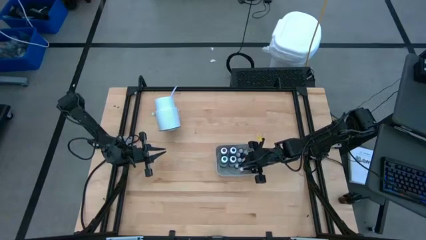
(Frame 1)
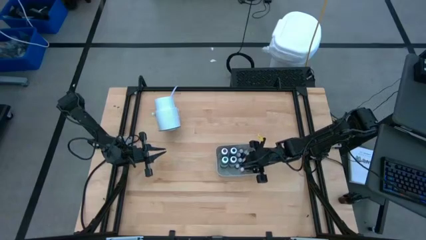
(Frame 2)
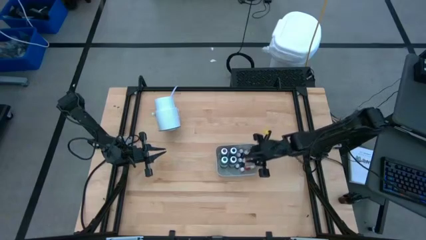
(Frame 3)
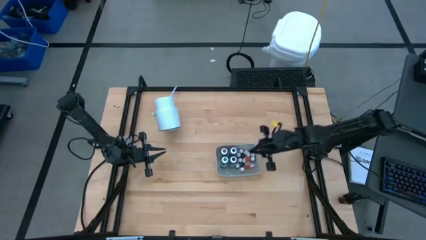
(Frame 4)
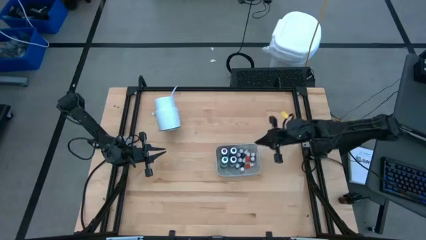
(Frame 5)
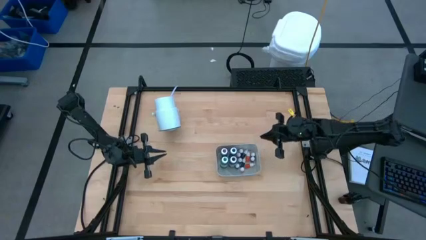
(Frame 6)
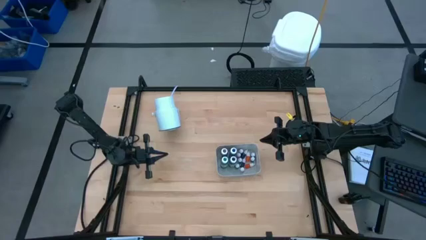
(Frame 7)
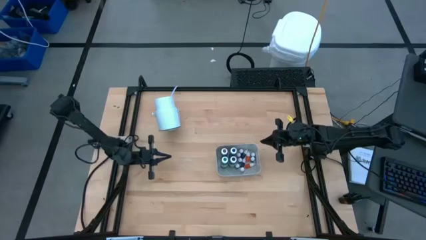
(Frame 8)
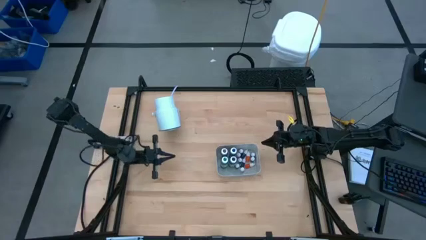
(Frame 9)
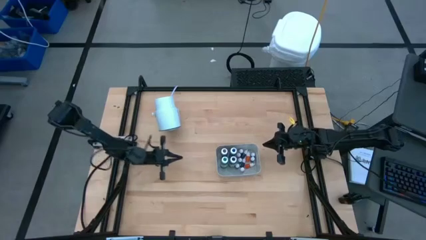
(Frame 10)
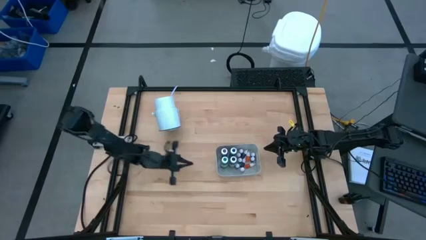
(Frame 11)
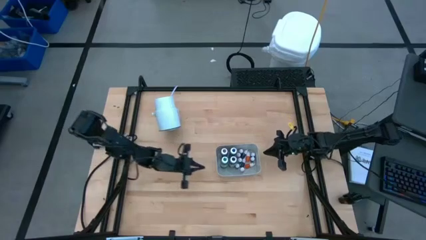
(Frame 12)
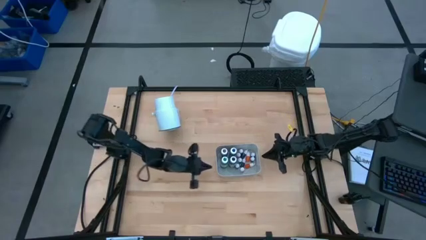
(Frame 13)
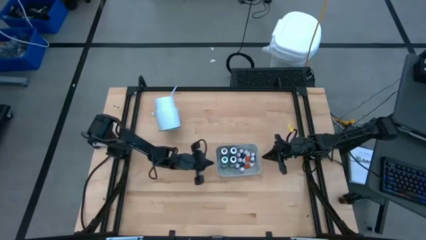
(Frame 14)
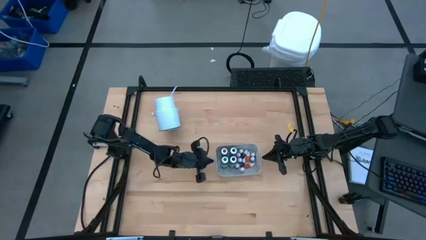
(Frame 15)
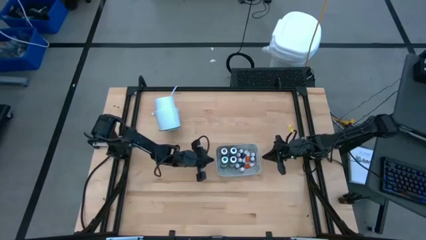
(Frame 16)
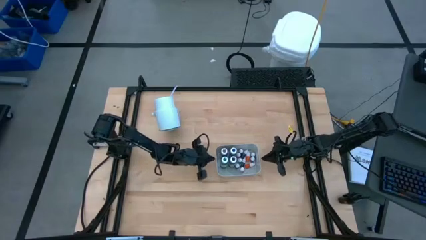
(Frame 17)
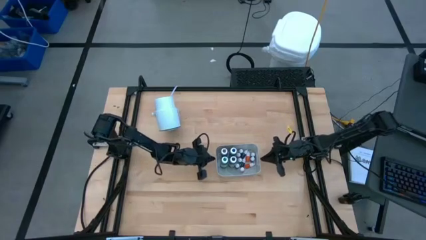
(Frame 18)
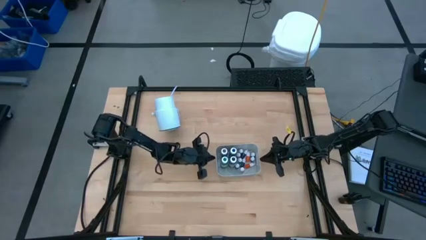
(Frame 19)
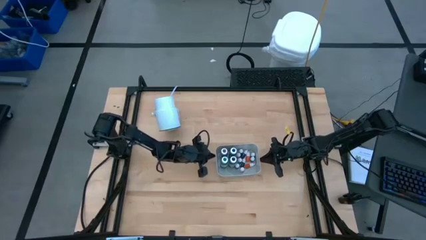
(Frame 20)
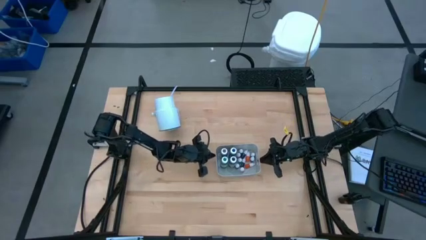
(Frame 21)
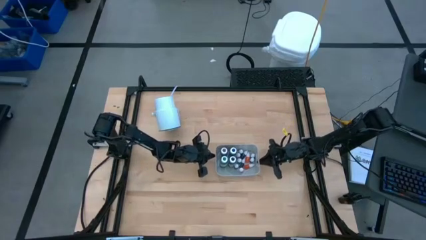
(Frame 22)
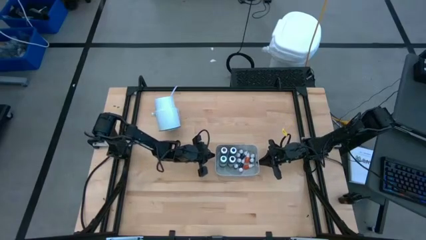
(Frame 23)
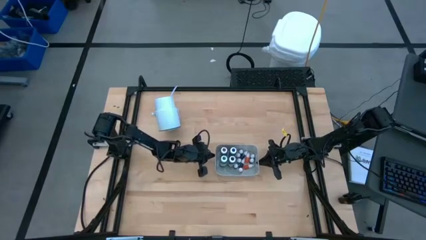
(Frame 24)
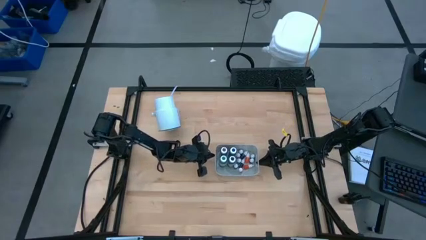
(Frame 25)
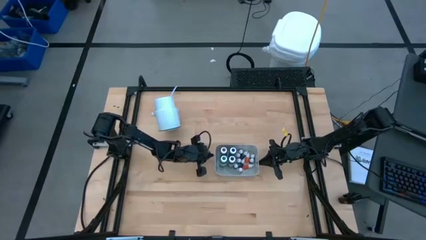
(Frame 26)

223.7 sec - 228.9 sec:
Task: Pick & Place food coloring
Adjust the bin on the table

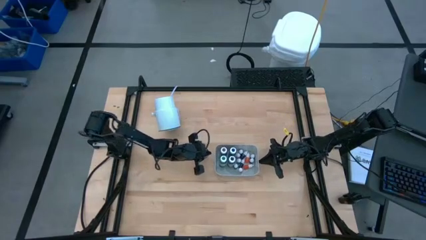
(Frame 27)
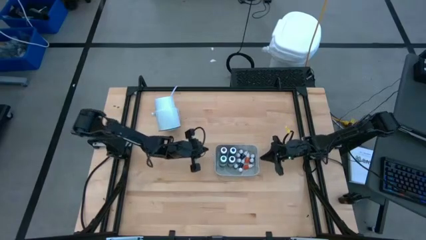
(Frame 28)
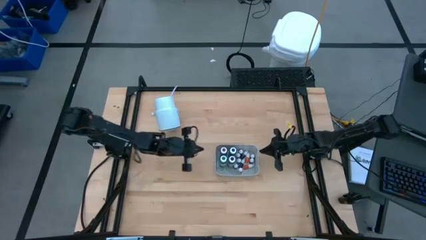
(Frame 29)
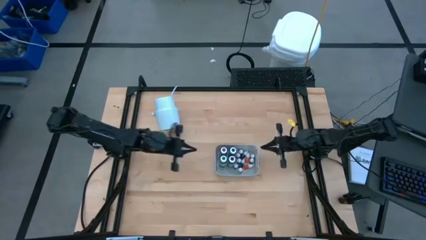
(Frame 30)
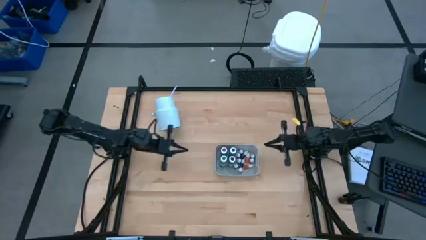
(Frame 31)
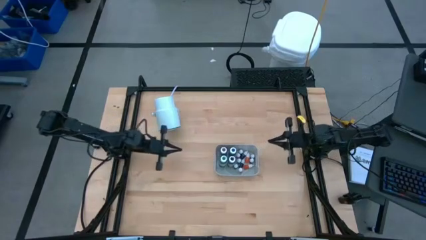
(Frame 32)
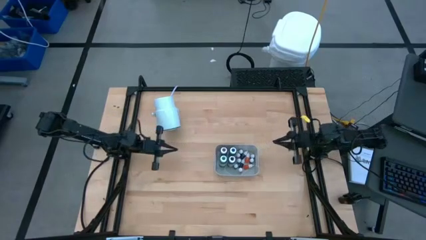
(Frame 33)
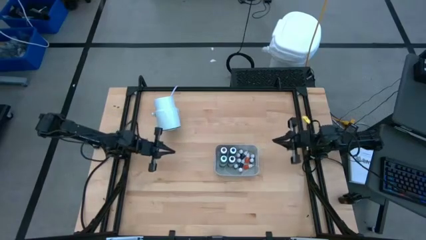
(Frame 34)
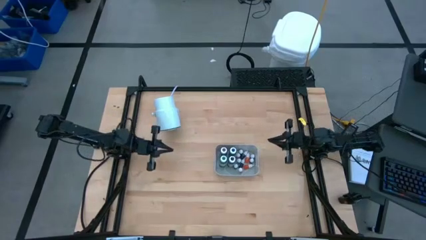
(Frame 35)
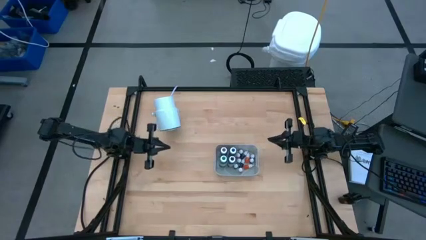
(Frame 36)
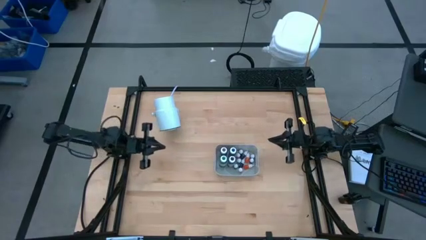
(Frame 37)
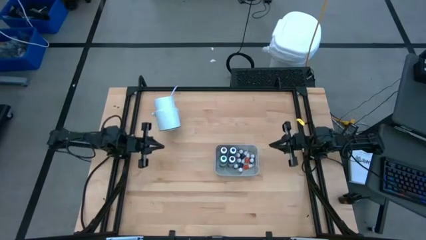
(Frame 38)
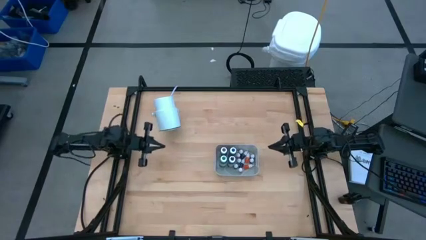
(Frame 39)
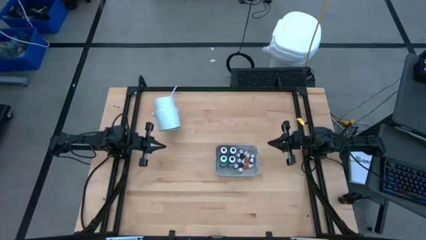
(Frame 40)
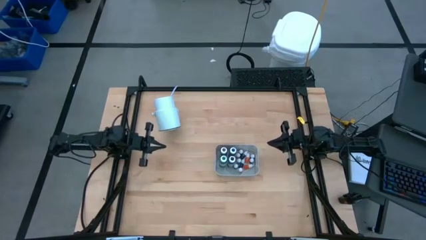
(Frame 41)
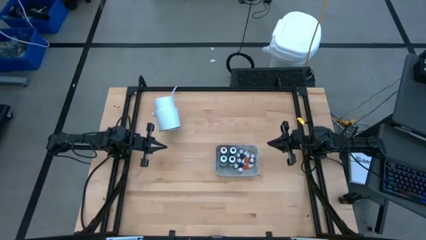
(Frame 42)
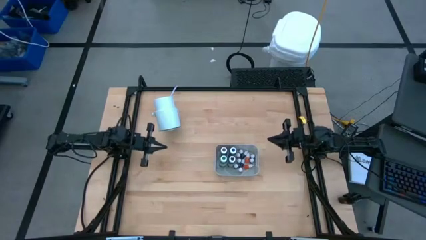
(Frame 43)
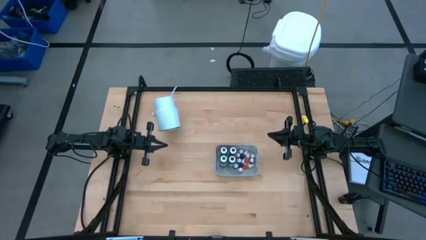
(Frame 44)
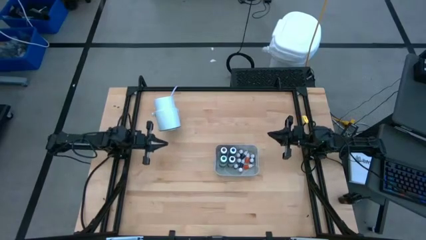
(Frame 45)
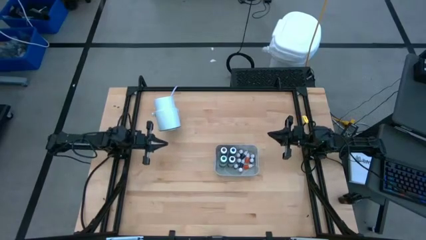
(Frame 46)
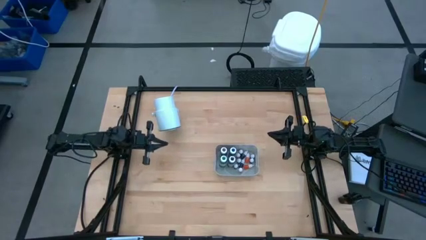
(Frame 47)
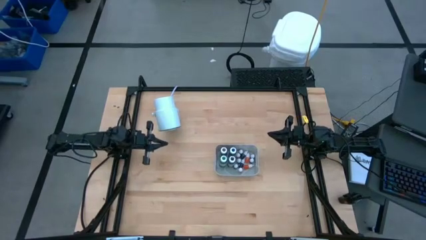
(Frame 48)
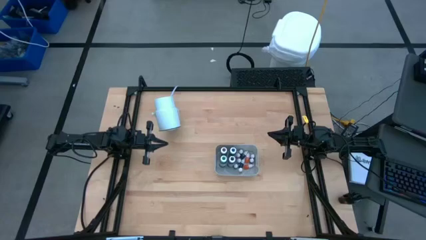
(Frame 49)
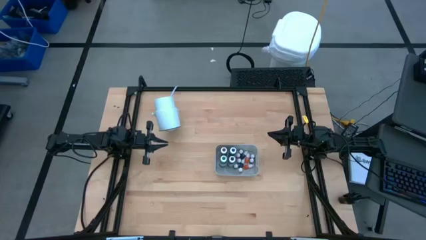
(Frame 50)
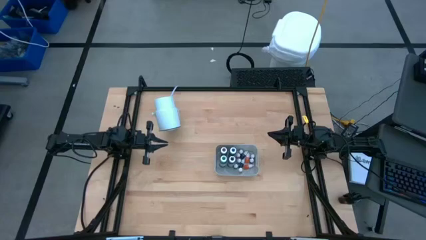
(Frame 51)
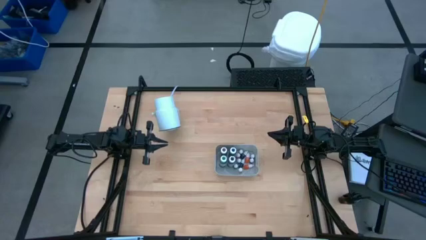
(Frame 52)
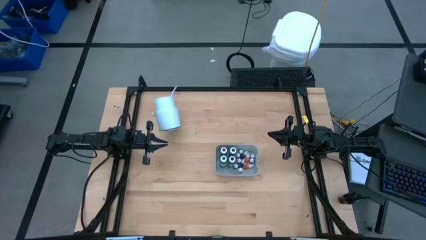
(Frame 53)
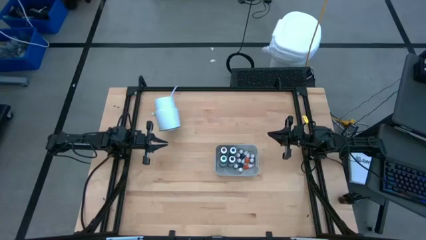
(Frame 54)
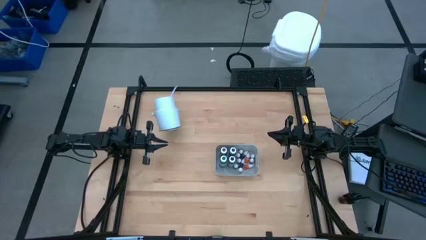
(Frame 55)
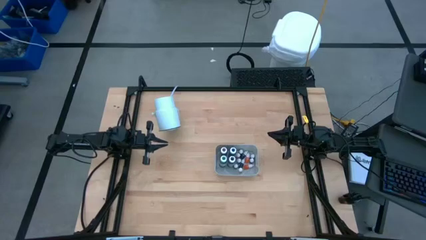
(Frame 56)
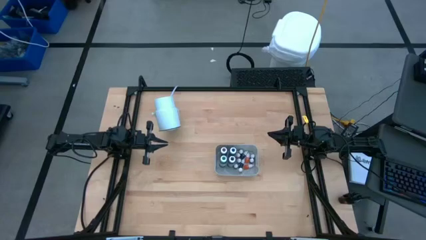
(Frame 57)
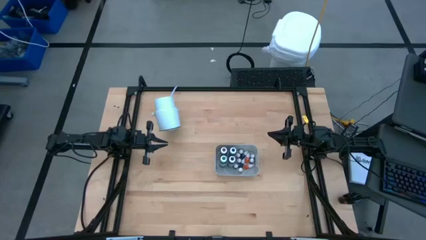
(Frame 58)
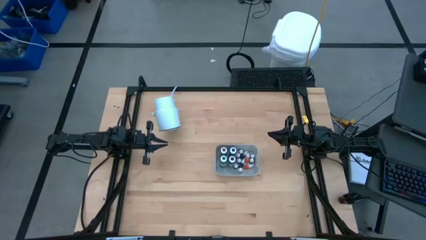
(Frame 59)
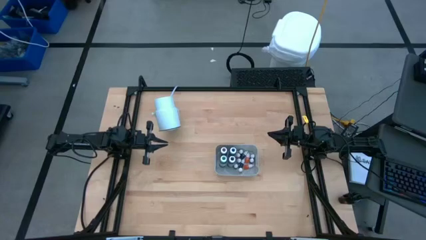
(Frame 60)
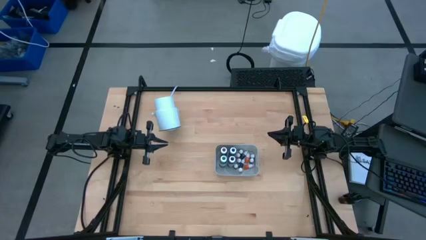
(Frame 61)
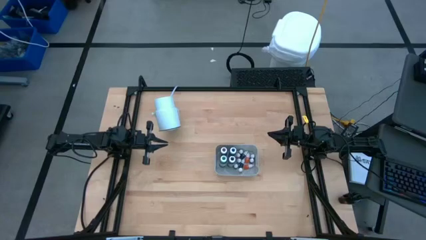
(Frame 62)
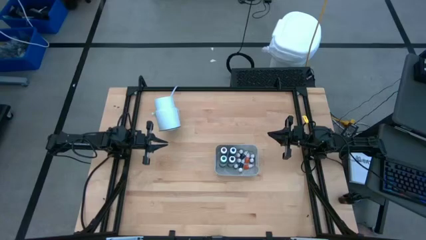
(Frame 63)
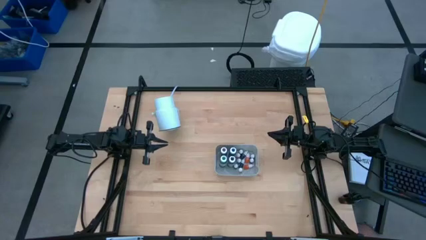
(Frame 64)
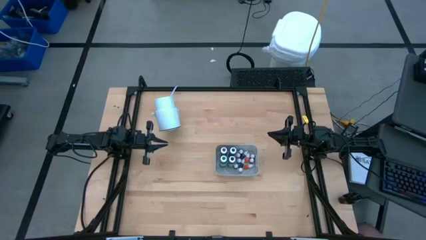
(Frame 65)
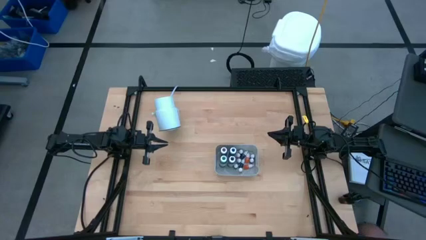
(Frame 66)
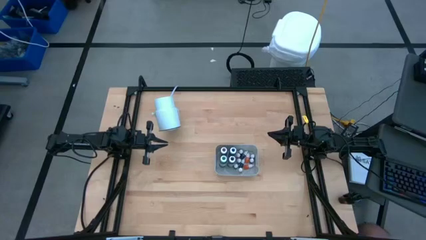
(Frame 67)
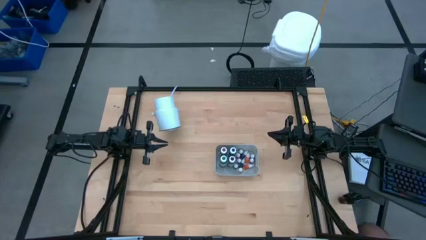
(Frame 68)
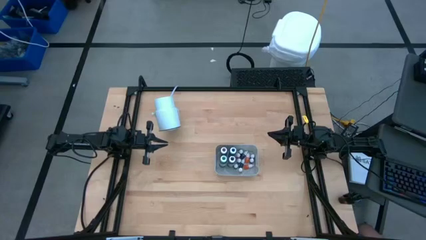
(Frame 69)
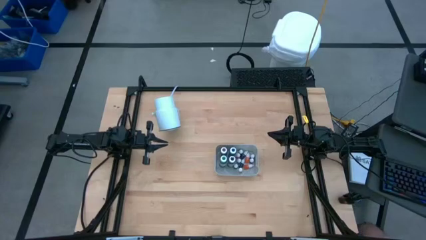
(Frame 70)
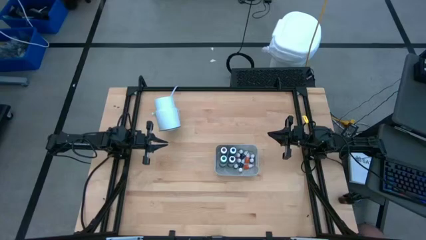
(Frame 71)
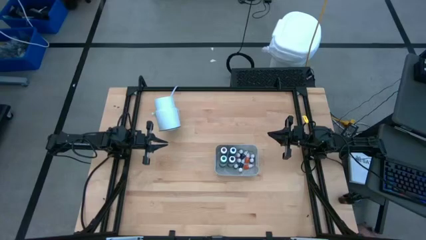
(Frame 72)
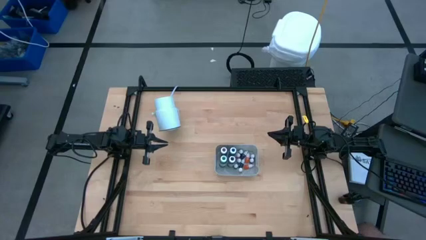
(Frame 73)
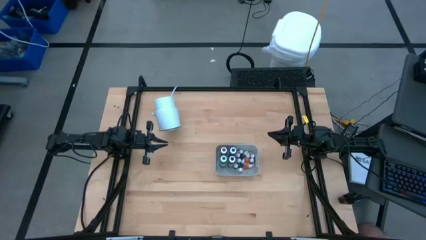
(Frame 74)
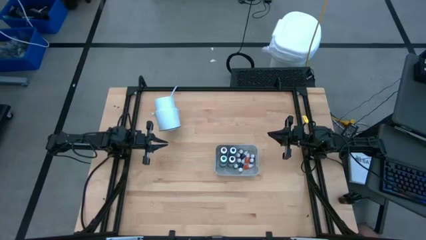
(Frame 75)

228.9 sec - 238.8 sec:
Return to Home Position

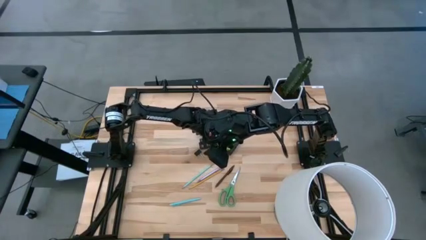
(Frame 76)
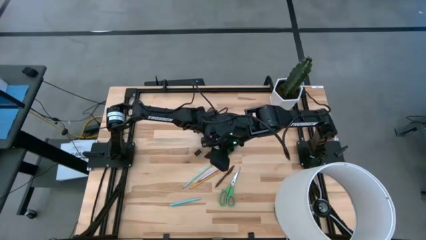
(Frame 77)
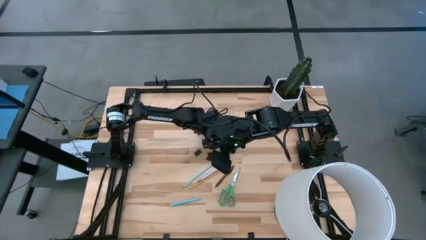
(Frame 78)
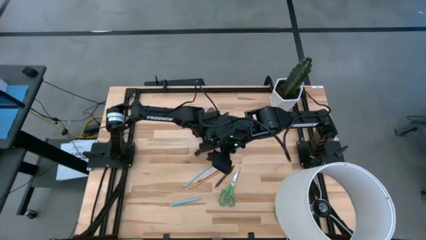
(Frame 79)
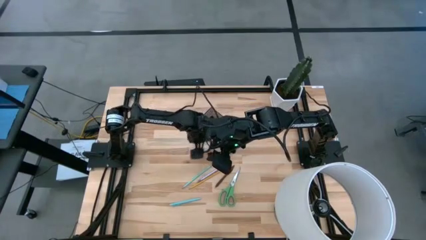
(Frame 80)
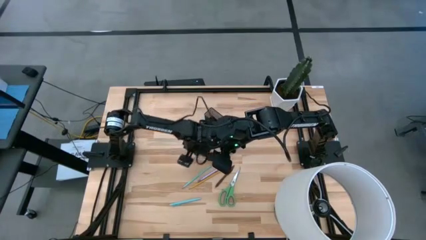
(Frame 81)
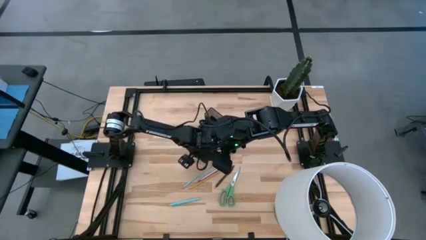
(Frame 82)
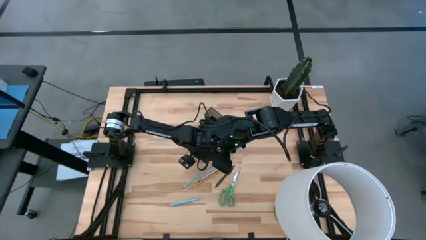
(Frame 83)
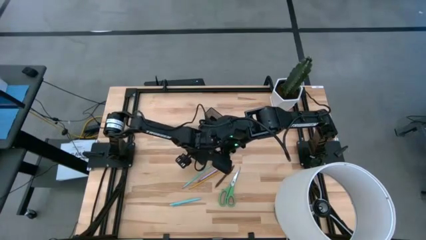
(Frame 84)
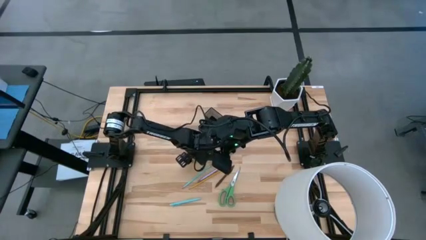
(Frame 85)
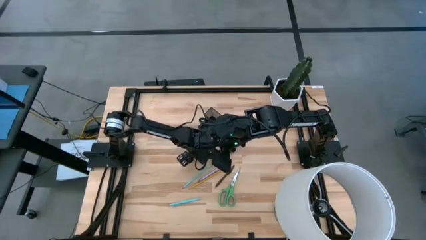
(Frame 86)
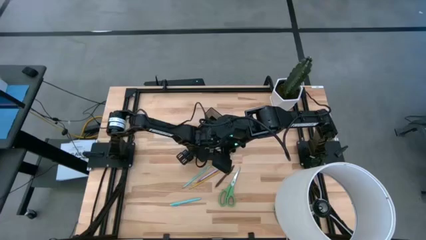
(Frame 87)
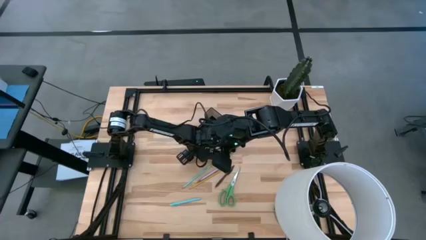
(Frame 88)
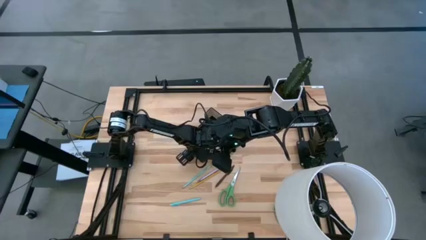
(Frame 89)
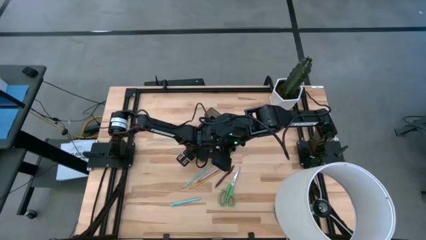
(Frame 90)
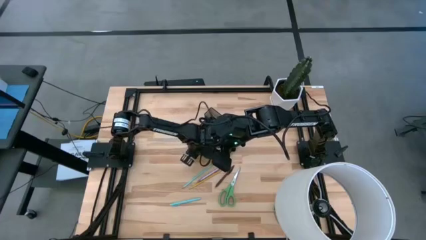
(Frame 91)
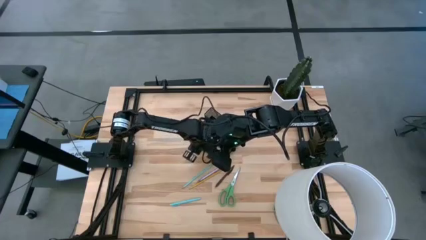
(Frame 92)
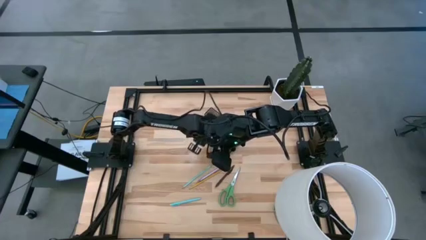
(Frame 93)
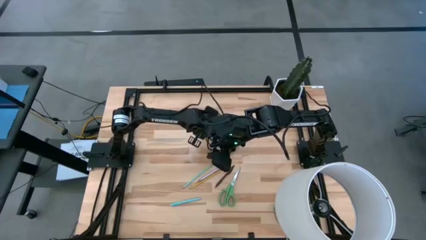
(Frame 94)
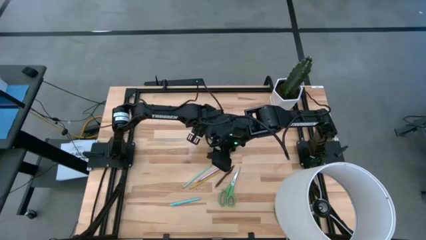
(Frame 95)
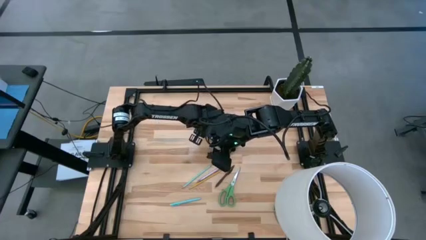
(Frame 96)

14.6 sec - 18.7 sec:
Task: Pick and place office supplies into organizer
Put the left black binder clip into the black desk organizer
